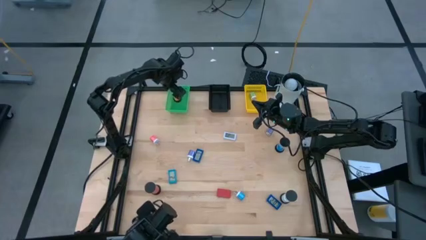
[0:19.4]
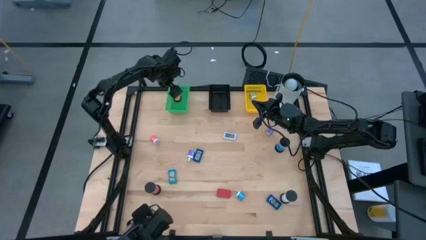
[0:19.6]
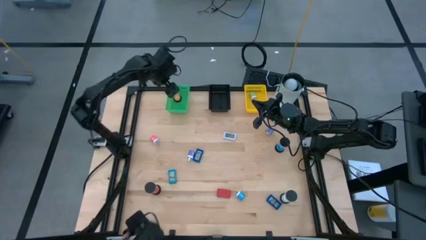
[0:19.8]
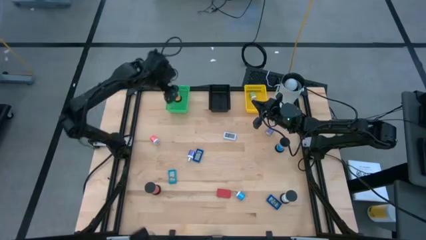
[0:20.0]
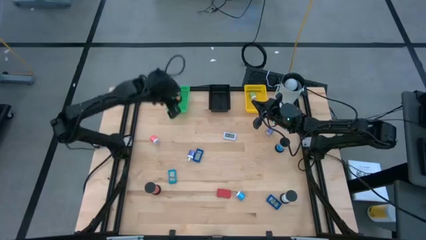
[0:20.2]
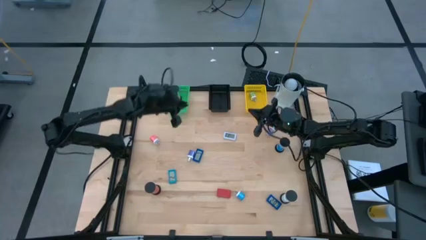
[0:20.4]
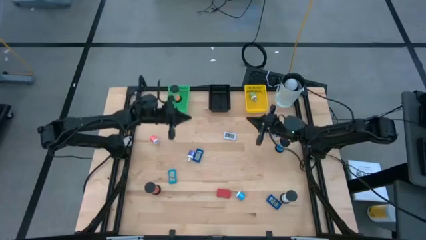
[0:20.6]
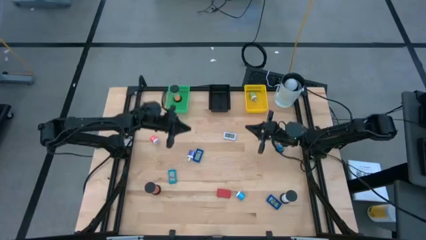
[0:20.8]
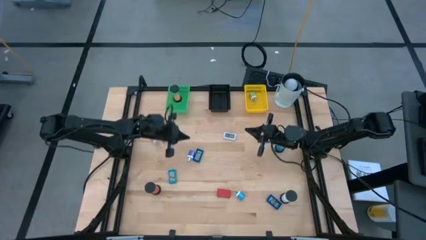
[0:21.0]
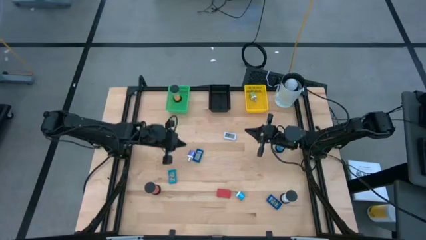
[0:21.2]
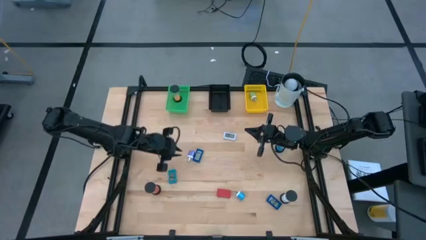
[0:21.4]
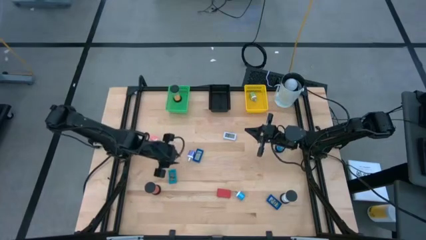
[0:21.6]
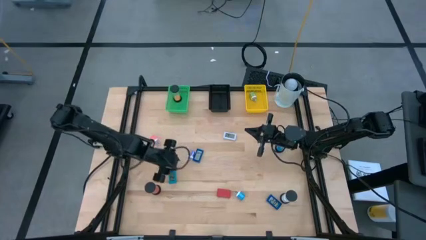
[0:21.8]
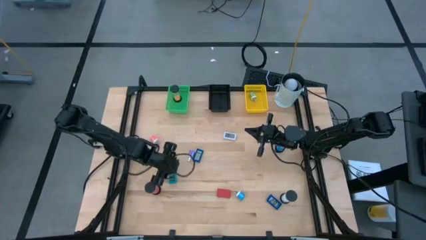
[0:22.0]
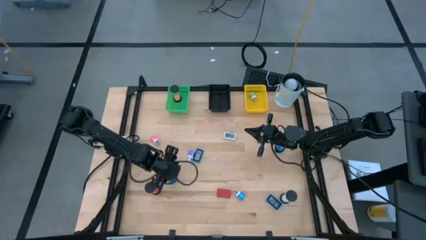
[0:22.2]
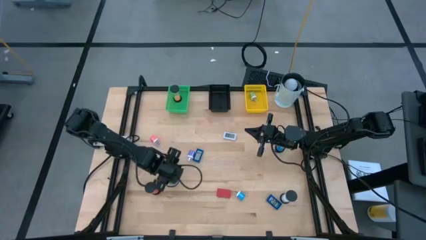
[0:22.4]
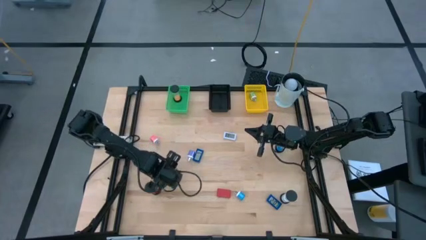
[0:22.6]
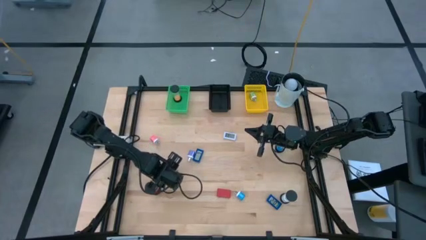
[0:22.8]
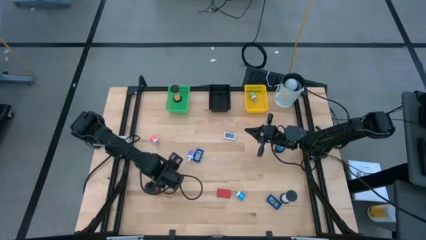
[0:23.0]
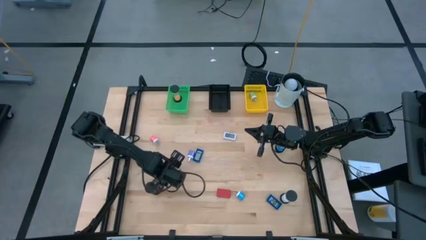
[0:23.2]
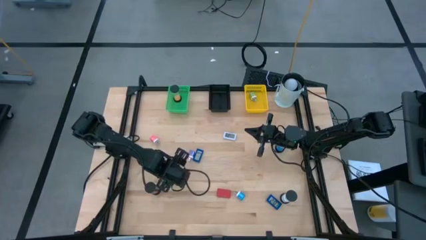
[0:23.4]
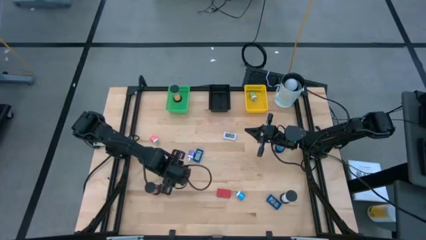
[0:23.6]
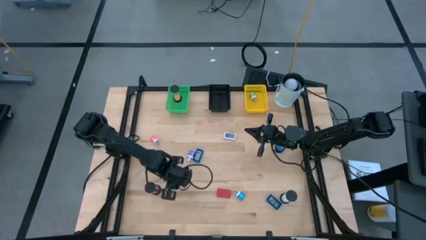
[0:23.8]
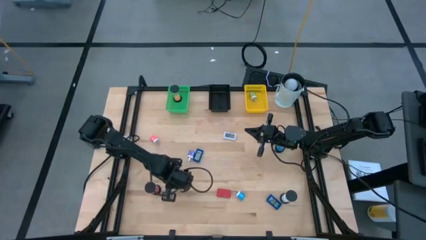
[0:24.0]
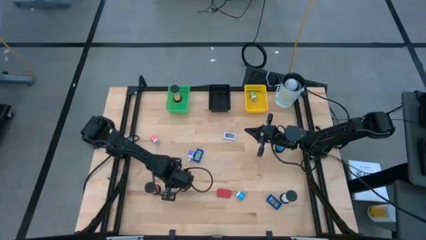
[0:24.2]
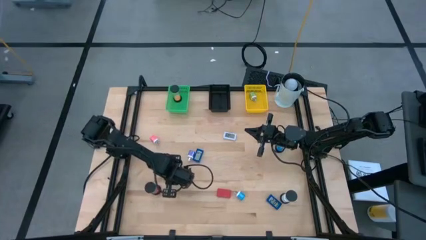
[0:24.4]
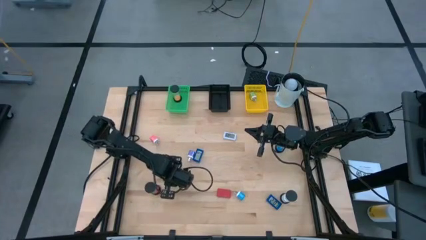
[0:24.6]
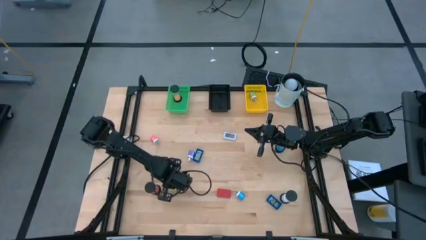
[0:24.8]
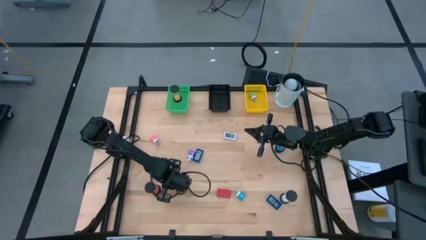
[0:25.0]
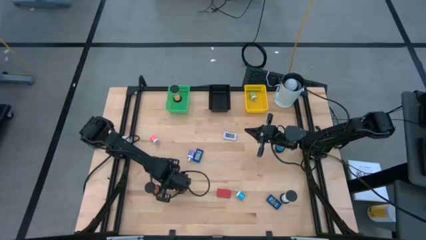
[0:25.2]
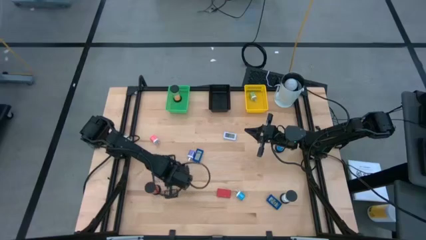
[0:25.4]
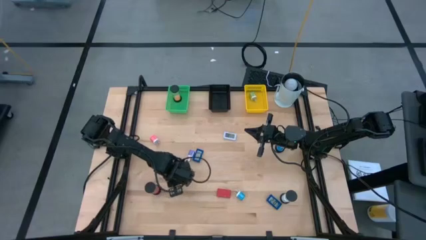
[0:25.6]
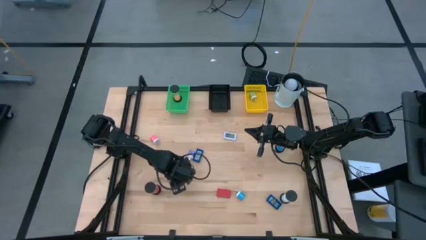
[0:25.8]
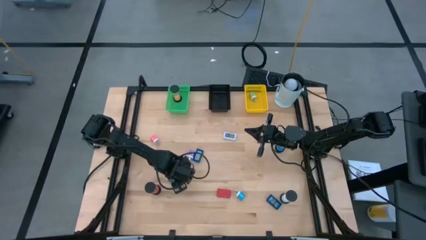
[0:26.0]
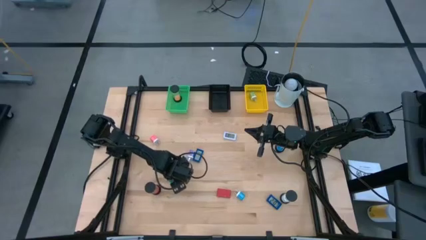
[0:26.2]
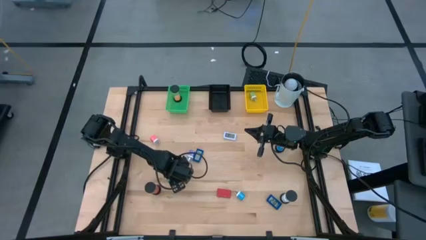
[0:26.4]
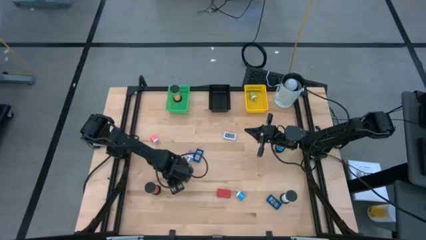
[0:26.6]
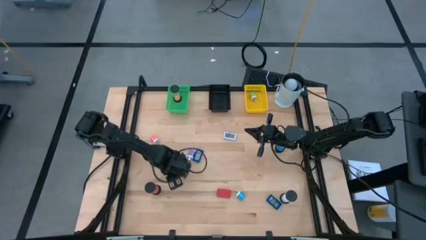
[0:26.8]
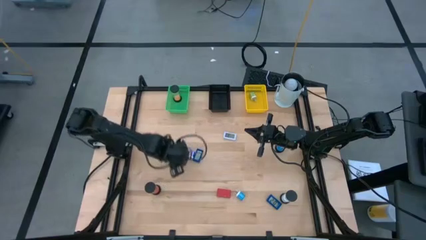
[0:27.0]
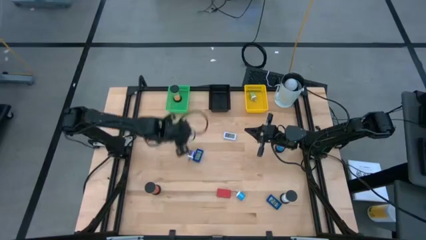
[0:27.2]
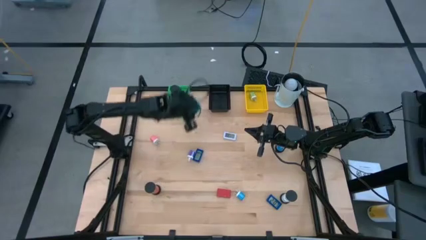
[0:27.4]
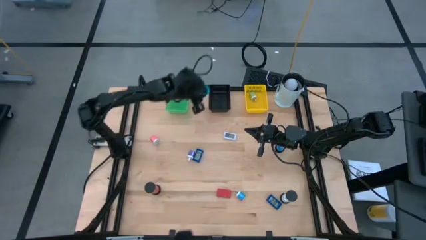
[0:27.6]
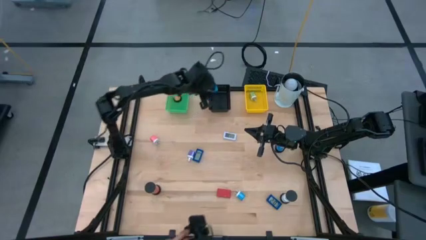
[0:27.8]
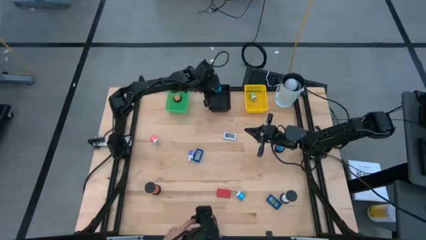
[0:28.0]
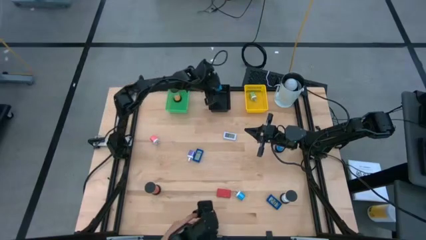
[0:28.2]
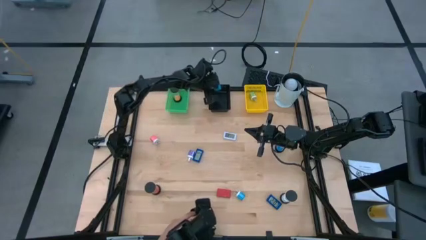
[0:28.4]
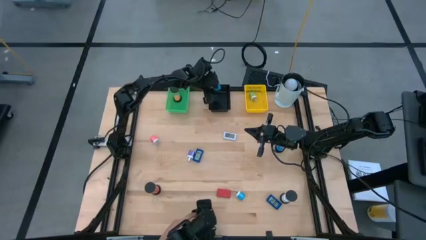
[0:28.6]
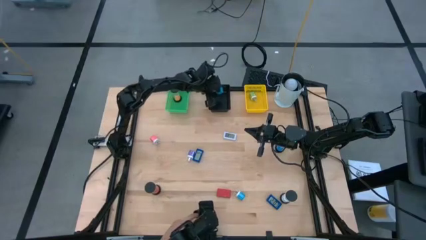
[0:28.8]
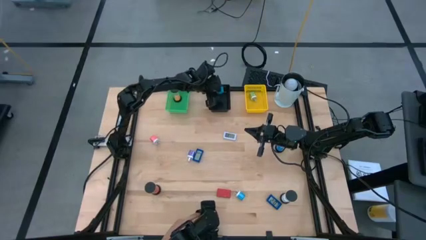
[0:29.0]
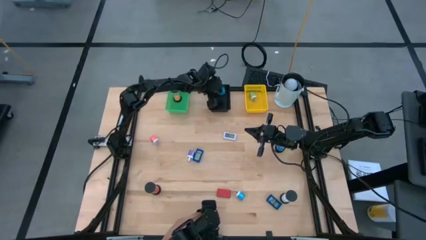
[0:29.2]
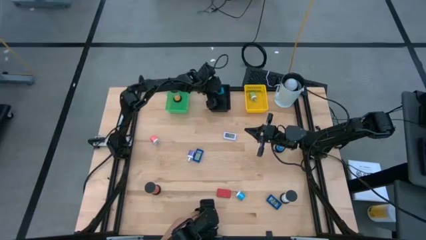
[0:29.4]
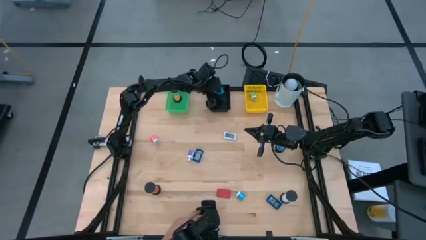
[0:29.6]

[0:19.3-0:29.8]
Task: Pick & Place Office items
Put the light blue digital timer into the black bin

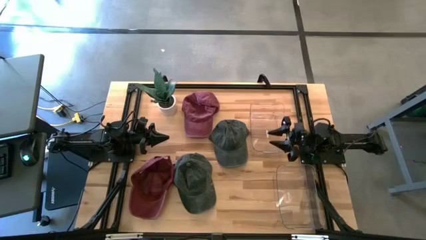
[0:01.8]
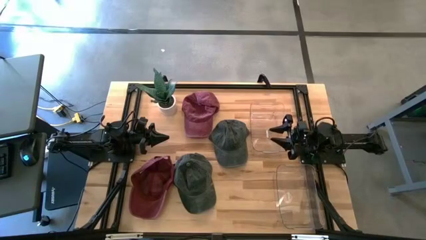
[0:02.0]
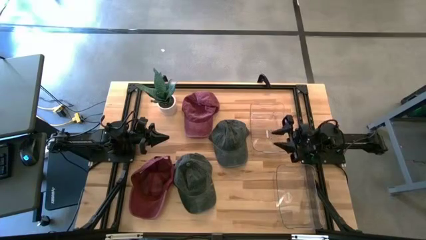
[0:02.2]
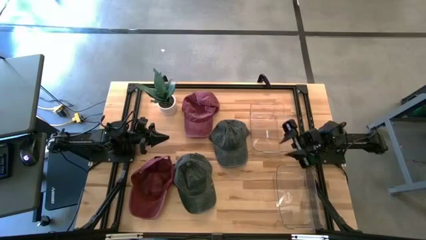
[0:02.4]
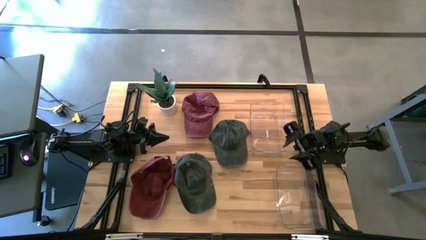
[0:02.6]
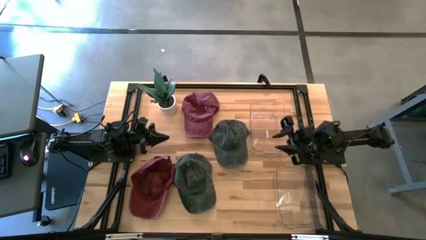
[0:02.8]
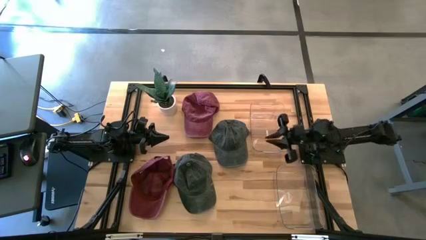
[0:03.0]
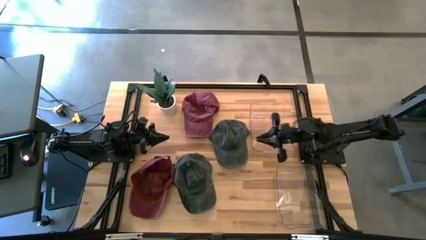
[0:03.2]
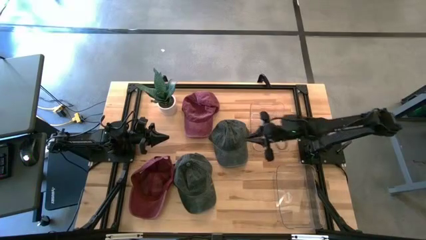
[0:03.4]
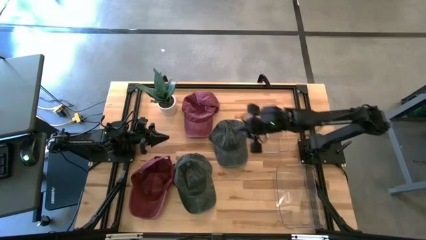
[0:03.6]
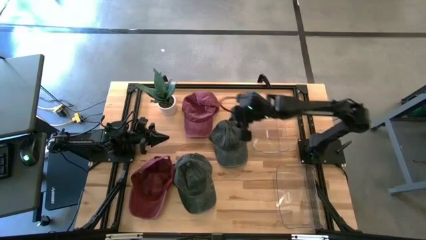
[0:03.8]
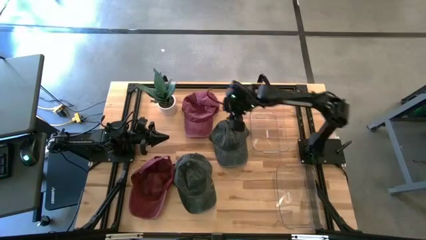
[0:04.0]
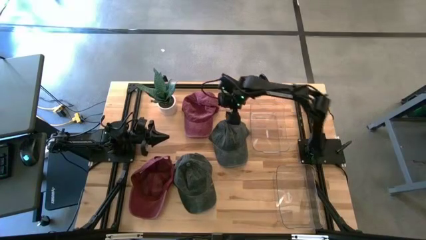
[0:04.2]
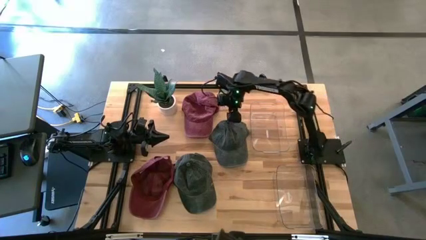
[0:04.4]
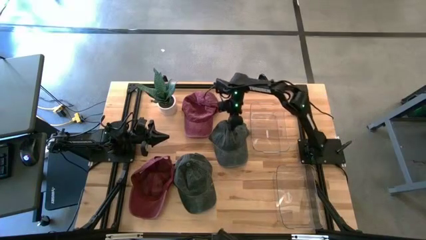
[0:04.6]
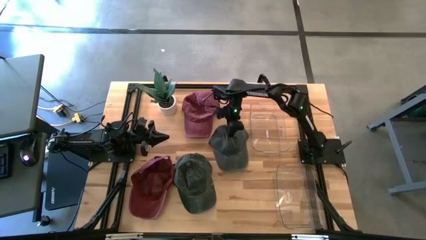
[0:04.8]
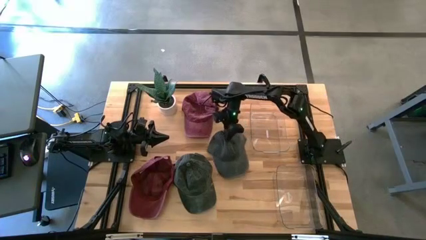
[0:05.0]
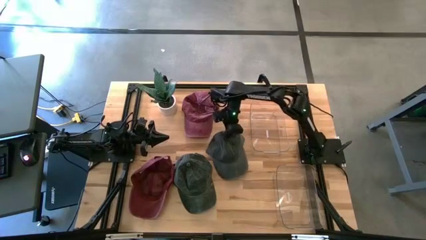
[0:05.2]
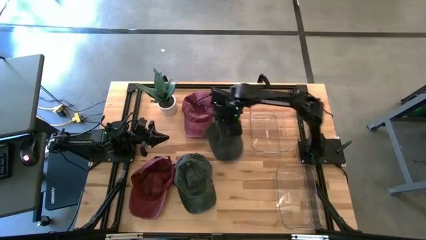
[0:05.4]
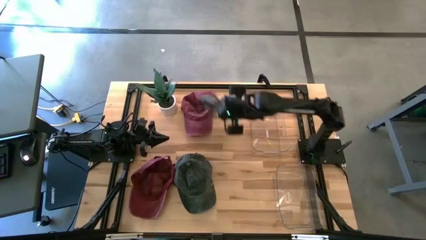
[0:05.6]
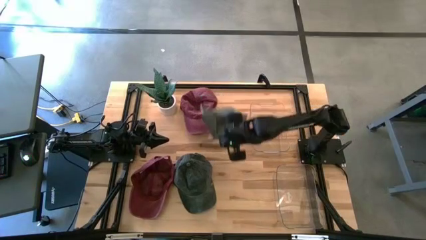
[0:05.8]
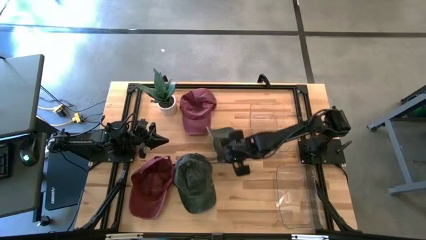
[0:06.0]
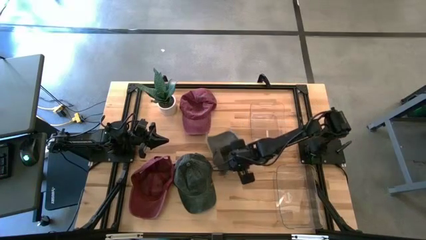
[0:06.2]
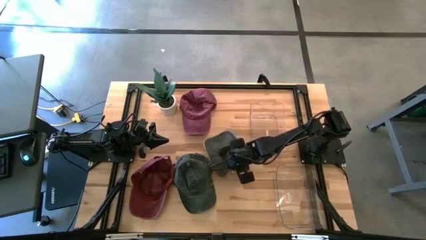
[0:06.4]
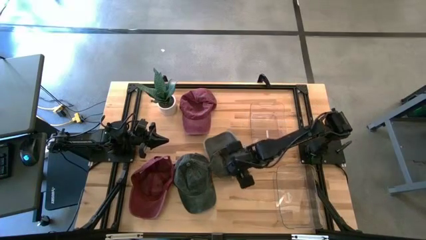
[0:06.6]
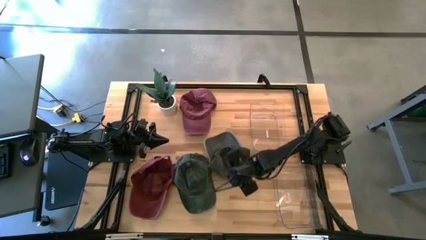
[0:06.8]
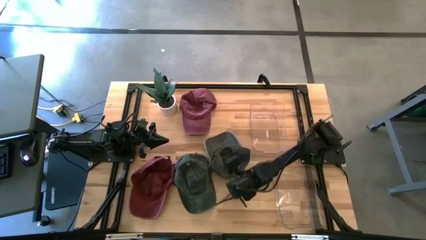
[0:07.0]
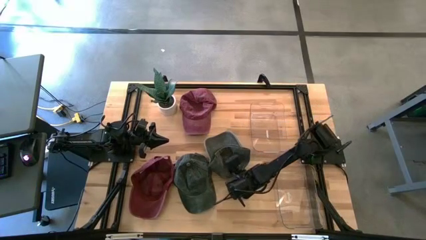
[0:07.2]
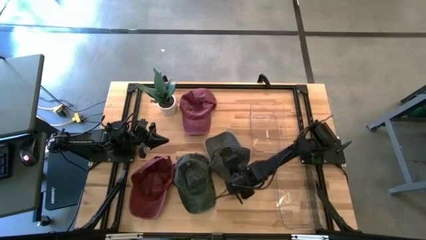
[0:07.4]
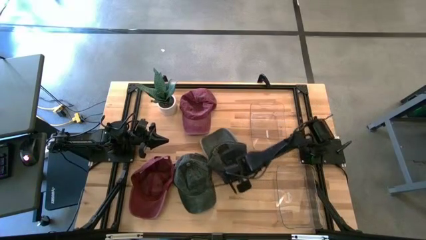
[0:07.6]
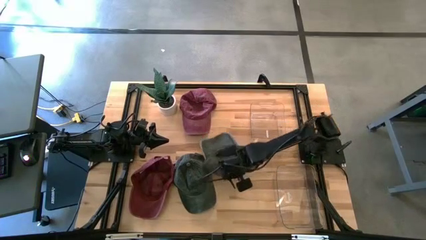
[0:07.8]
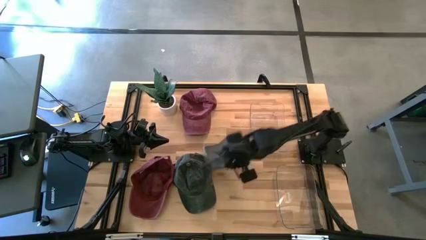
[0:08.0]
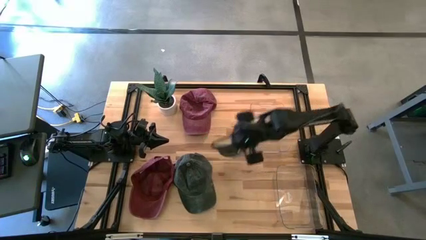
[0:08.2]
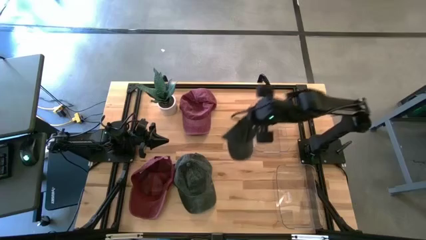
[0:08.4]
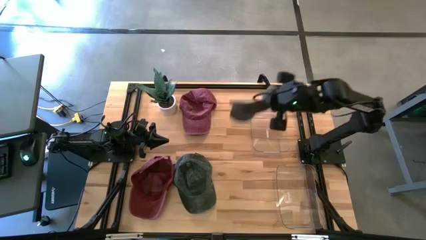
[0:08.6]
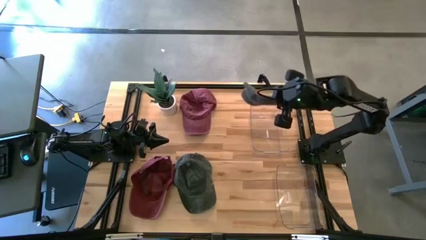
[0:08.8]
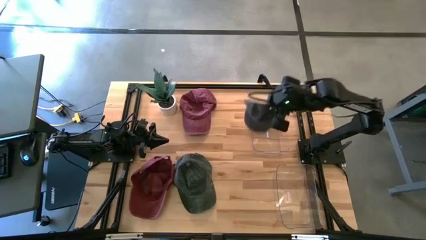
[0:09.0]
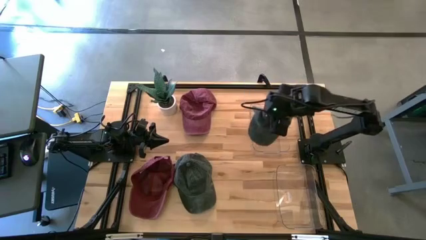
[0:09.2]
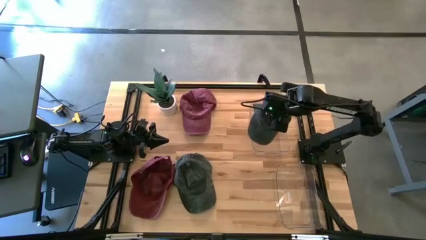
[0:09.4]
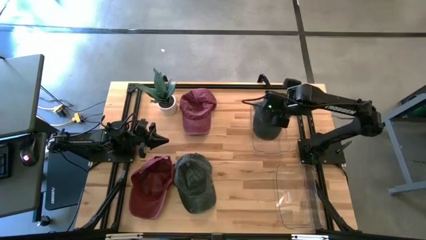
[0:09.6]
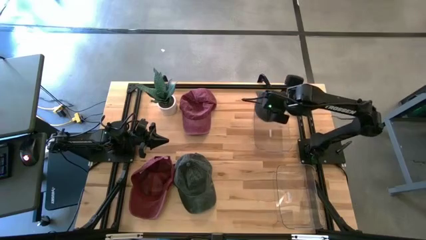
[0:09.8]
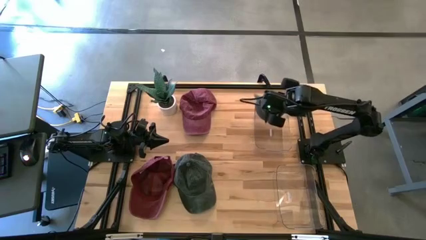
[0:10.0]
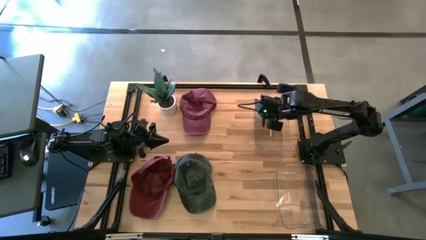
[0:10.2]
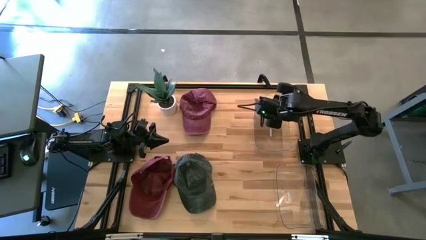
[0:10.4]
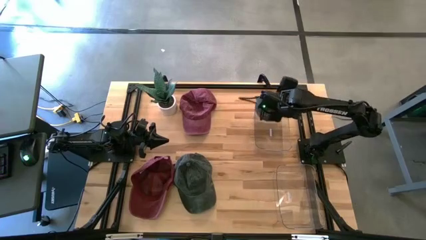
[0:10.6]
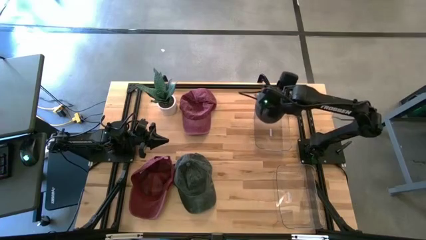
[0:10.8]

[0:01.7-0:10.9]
Task: Pick & Place hat
Put the top black cap into the top transparent bin
